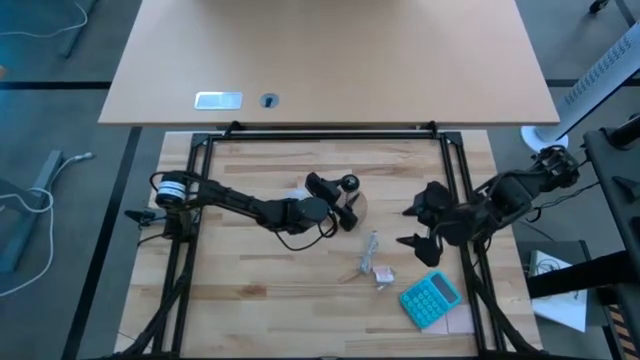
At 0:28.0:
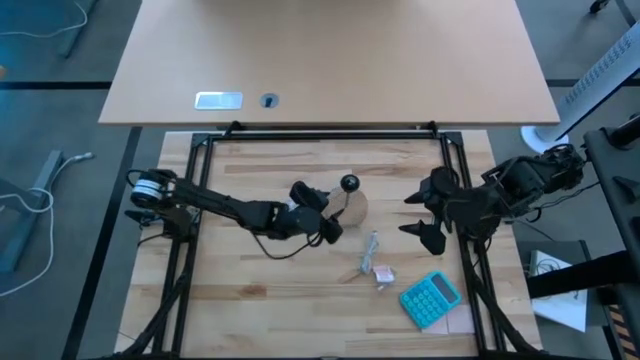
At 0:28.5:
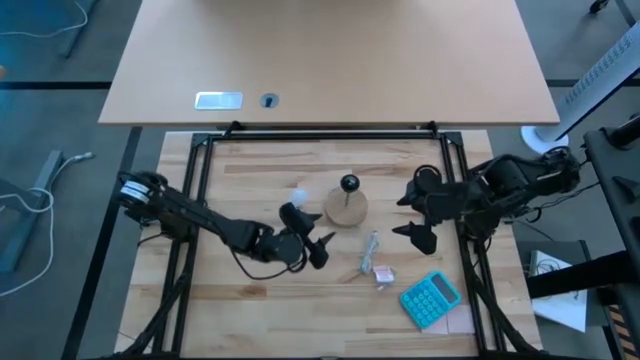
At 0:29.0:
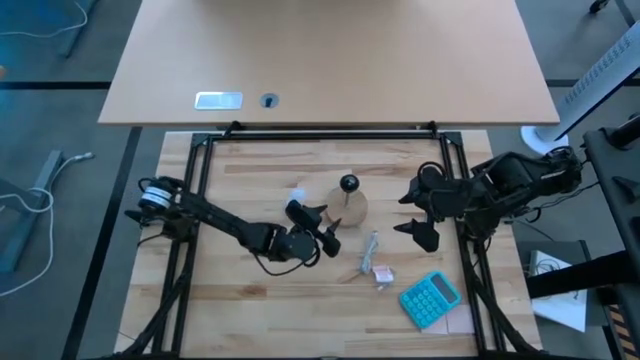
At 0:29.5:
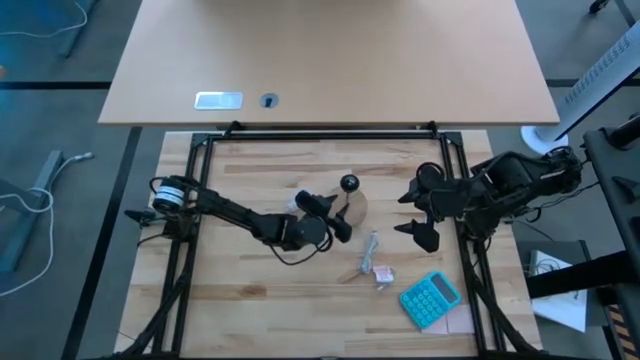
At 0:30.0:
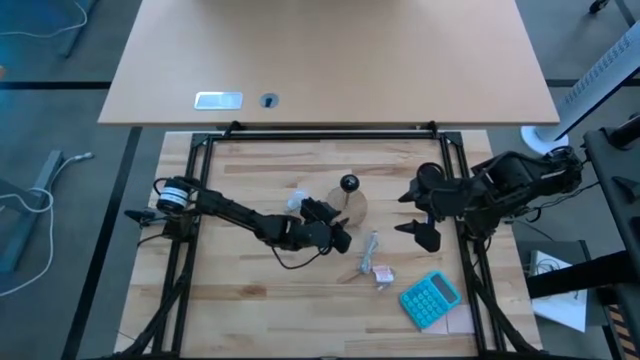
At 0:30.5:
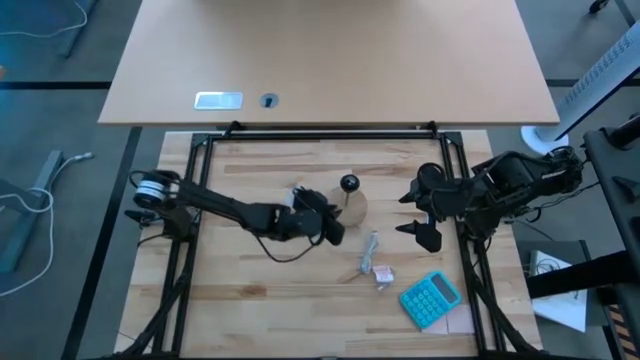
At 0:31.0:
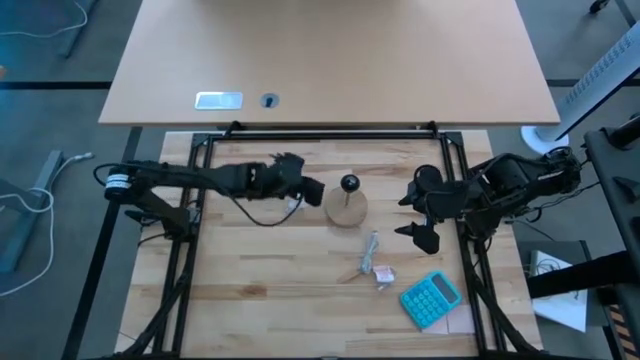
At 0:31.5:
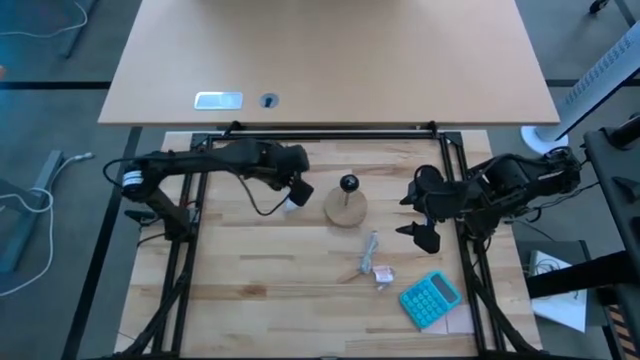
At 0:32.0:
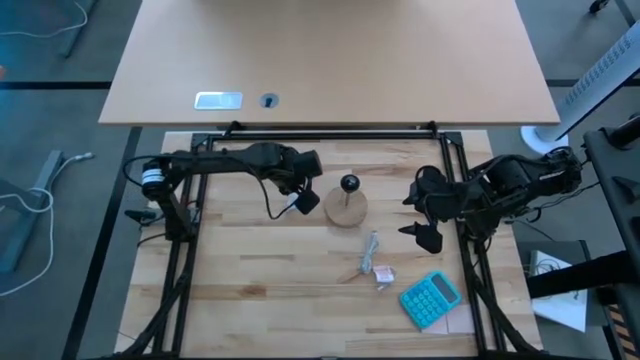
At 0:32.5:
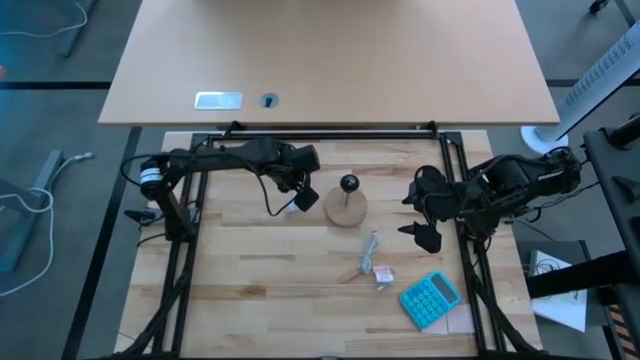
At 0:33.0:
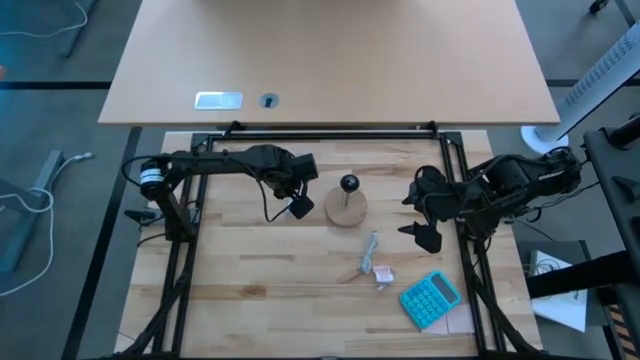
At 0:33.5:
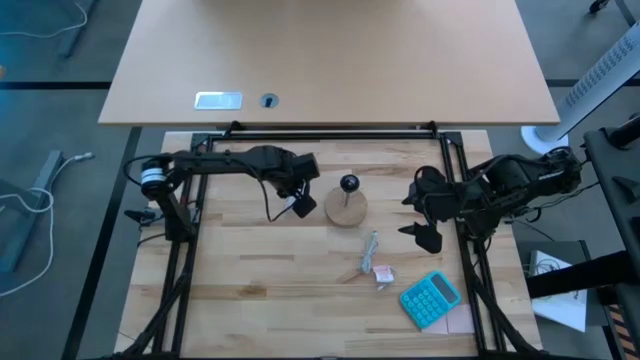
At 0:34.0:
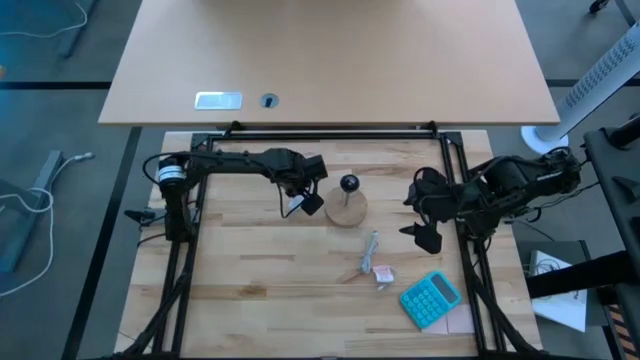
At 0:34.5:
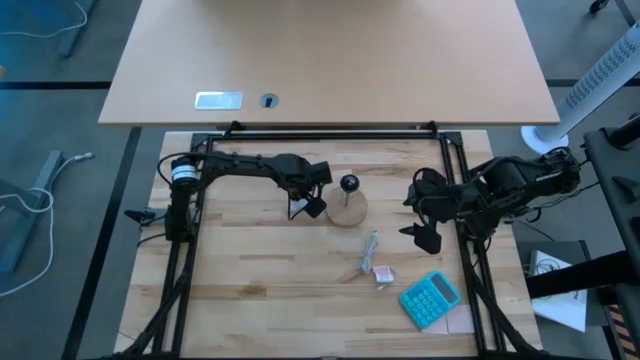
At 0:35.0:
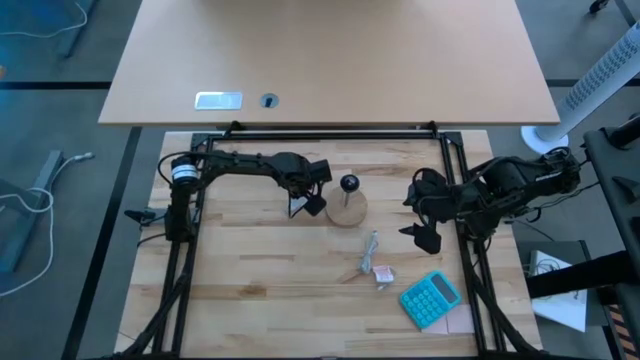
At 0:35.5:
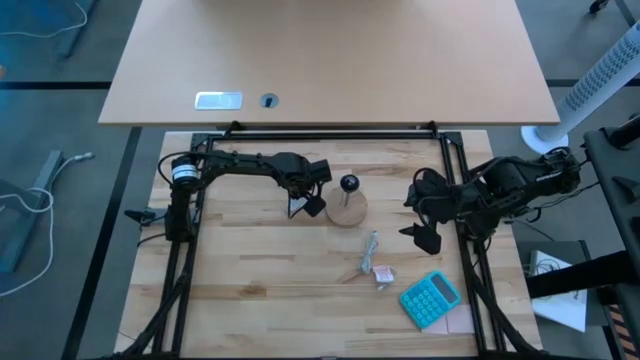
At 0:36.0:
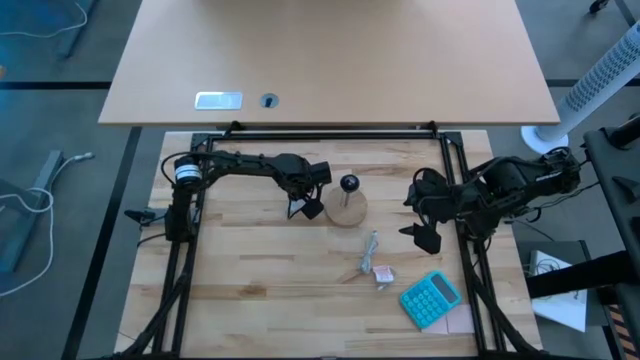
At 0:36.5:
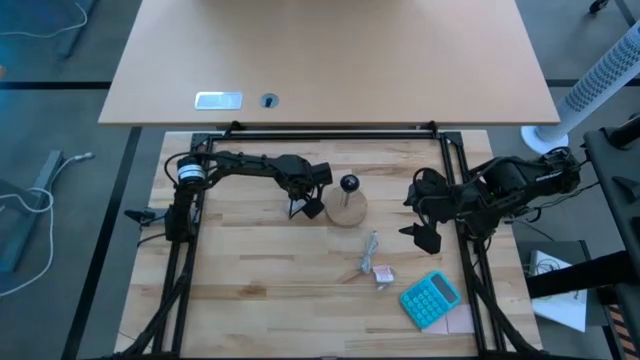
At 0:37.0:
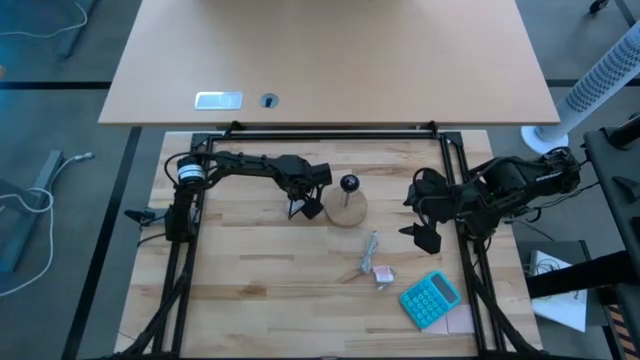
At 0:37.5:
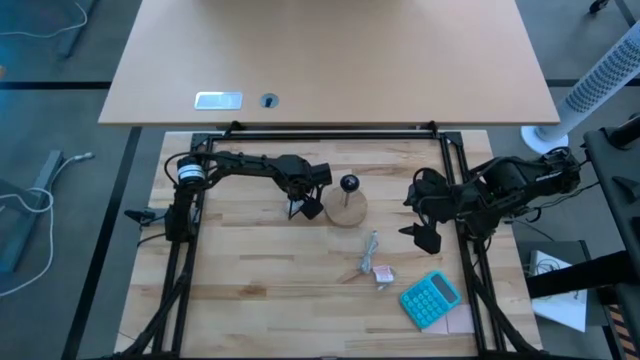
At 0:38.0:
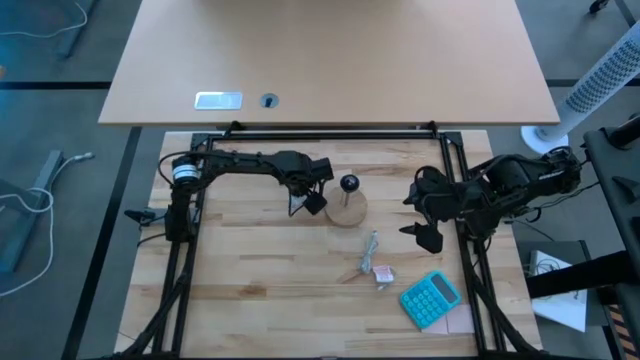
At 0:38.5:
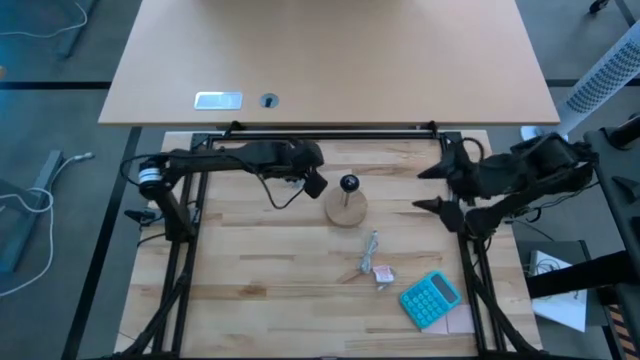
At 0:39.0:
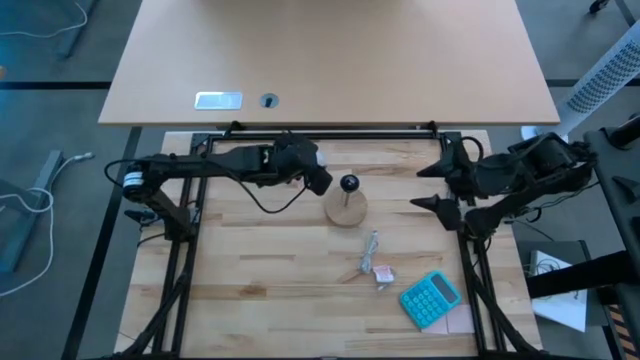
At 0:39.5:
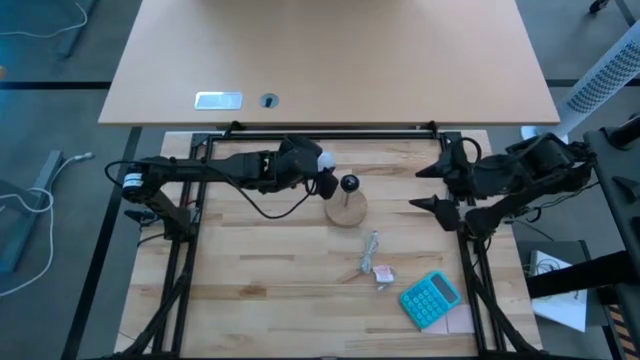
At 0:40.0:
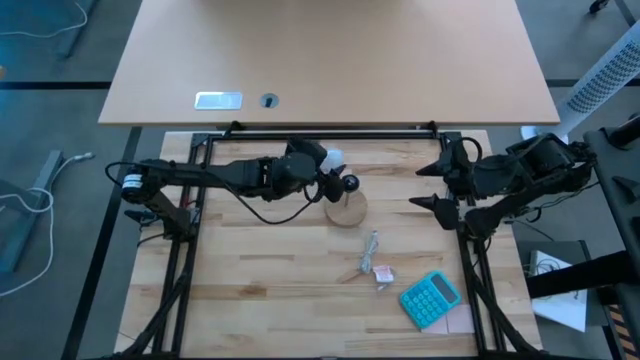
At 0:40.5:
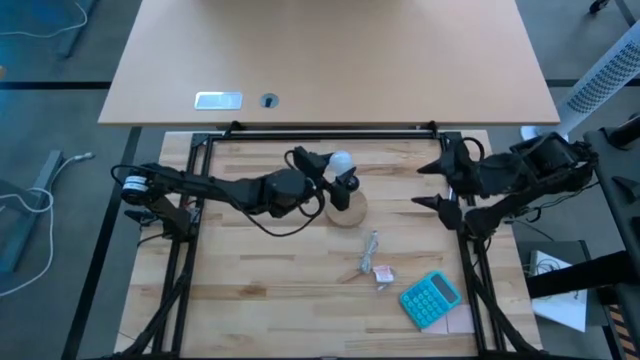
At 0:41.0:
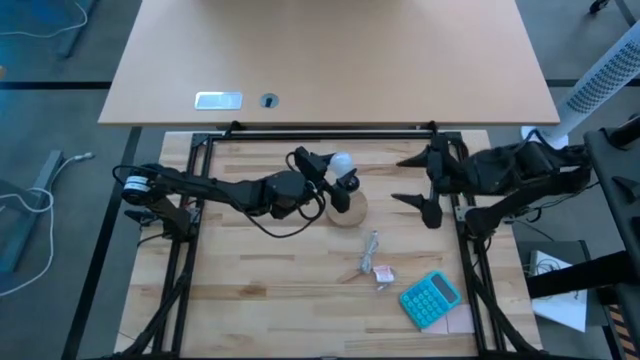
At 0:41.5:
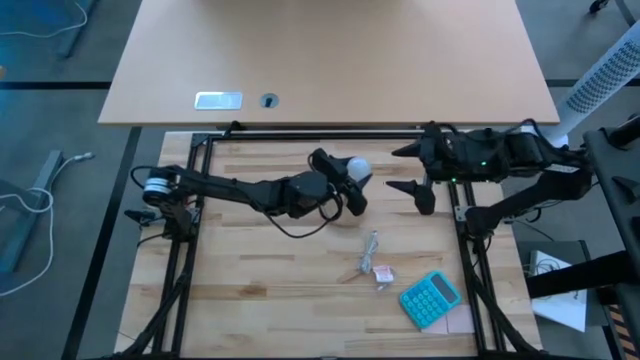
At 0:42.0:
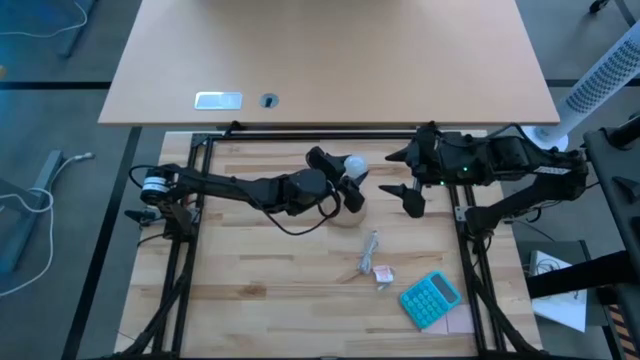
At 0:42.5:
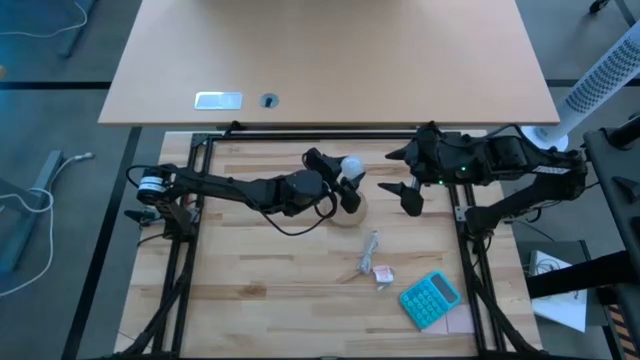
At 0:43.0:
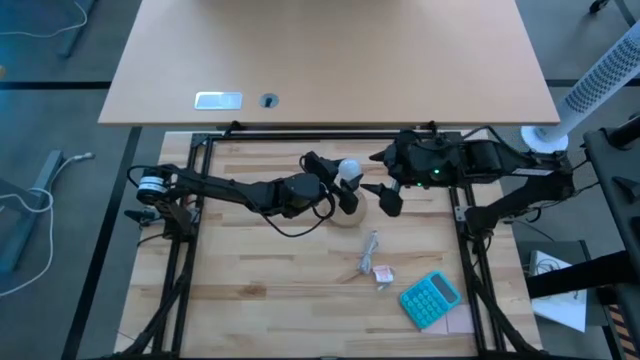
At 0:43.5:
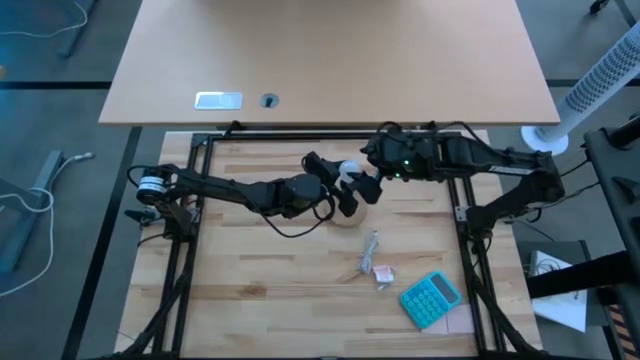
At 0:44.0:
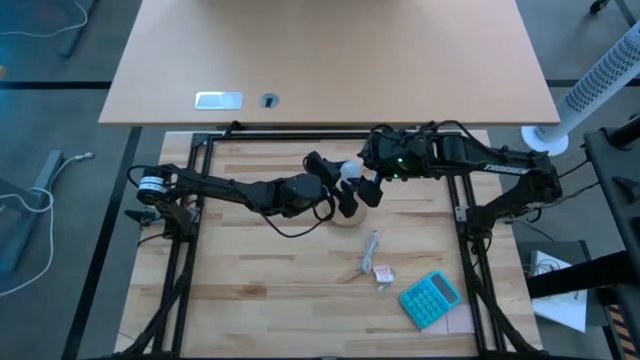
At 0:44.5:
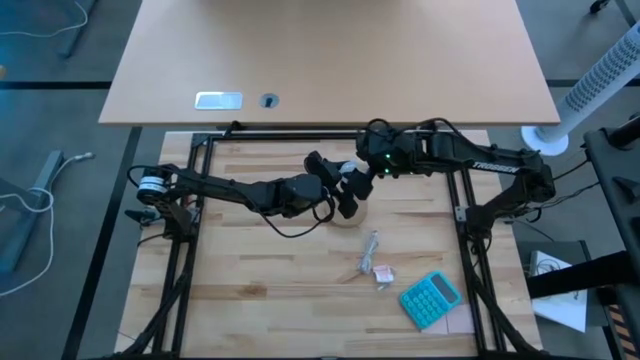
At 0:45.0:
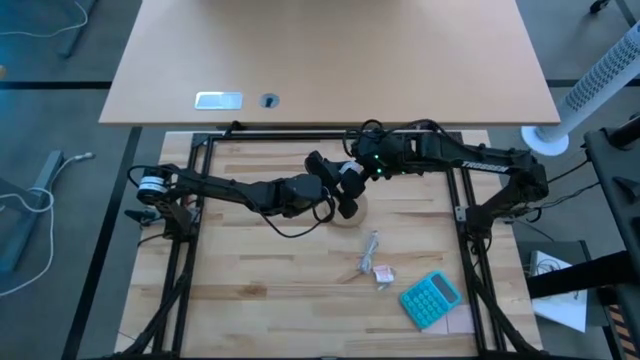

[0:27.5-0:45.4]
Task: Screw lightbulb
Insert the lightbulb into the lamp

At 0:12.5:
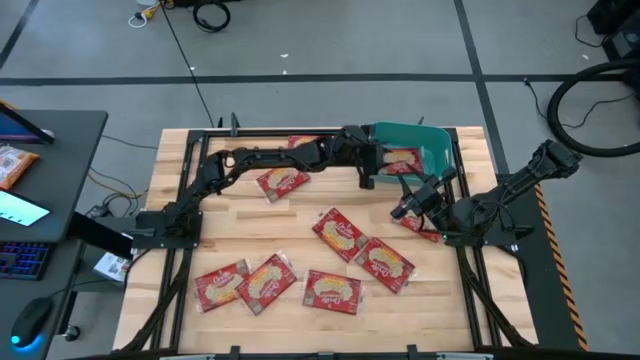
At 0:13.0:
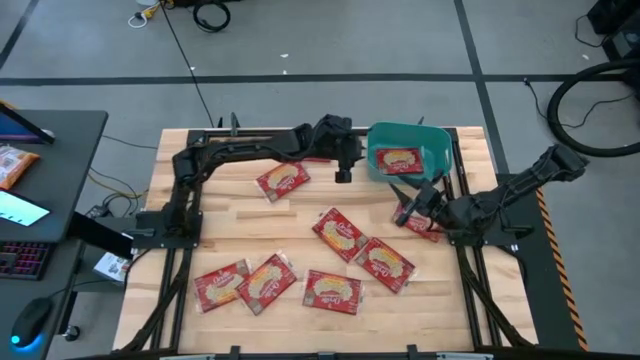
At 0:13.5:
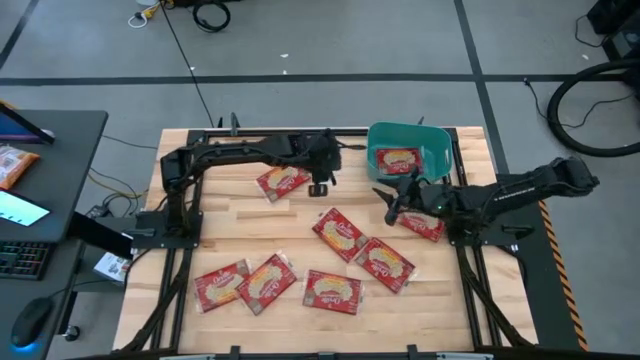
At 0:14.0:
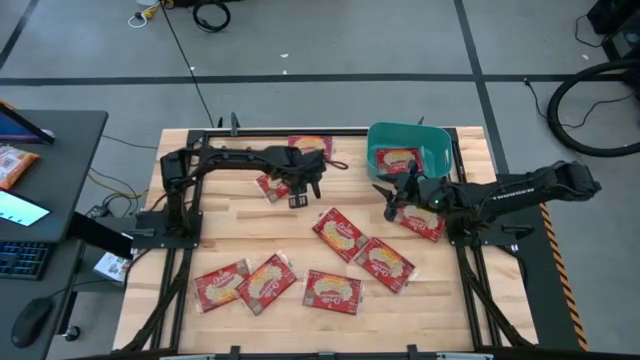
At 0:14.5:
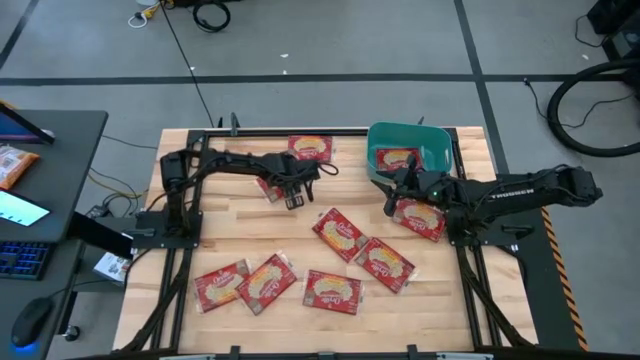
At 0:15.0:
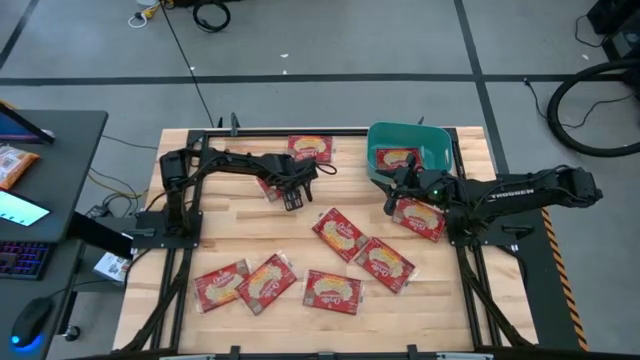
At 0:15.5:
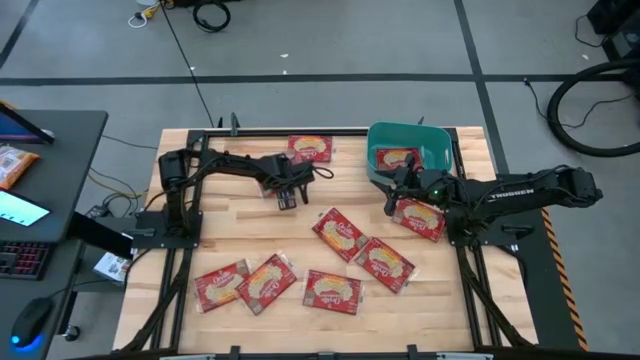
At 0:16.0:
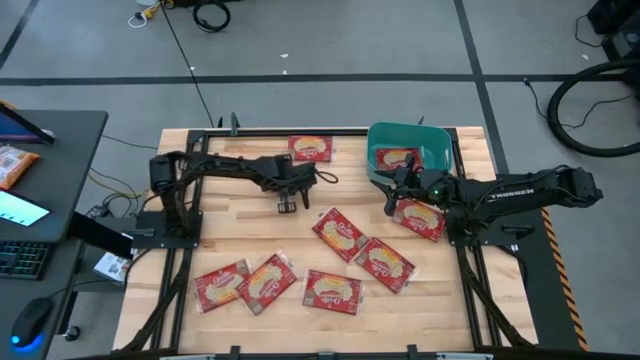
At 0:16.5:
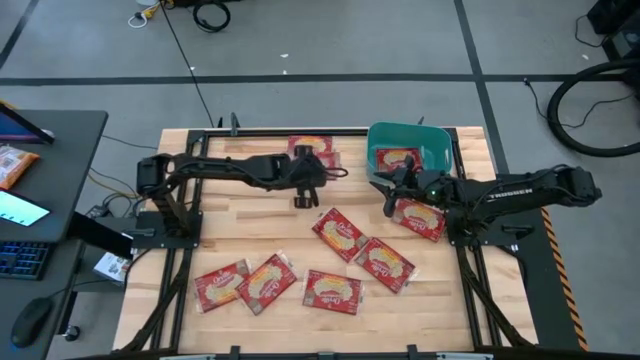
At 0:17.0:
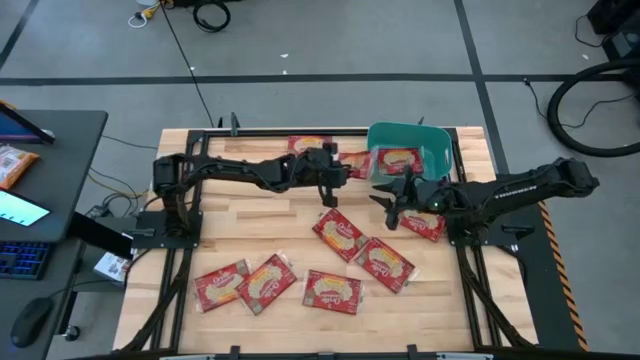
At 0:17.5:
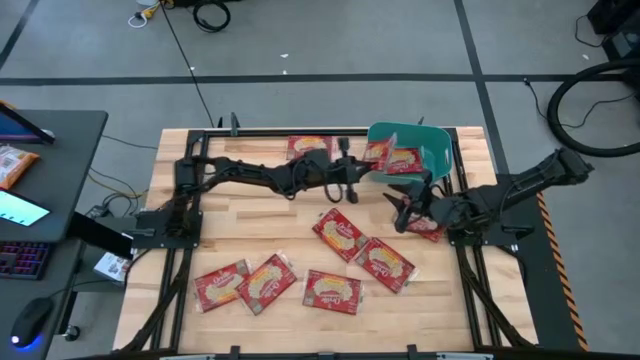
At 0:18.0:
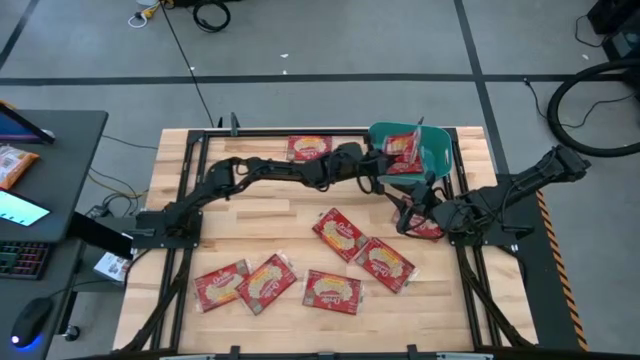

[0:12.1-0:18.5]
Task: Sort popcorn bags into baskets
Put the red popcorn bag into the blue bin
